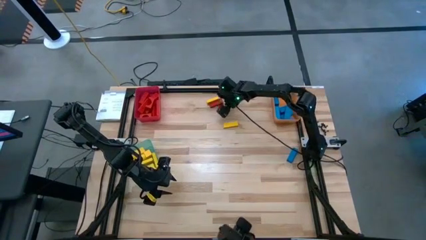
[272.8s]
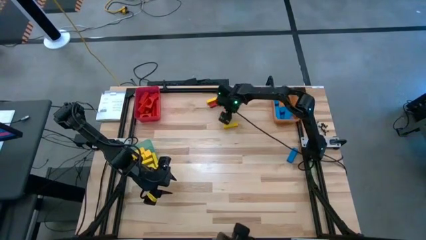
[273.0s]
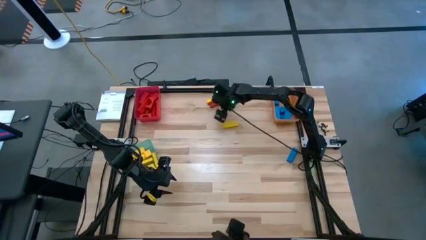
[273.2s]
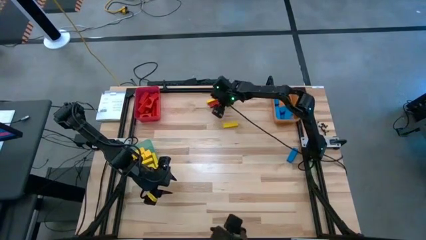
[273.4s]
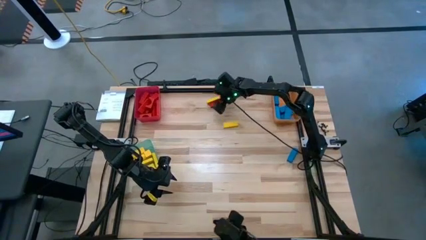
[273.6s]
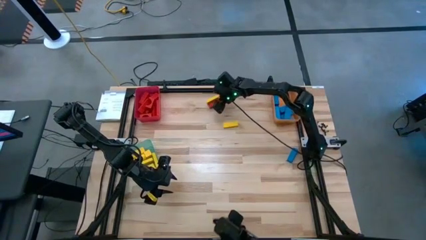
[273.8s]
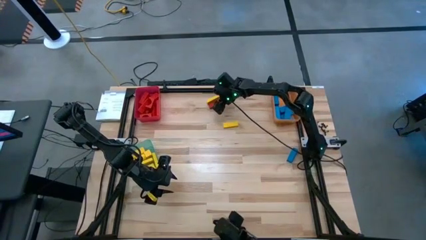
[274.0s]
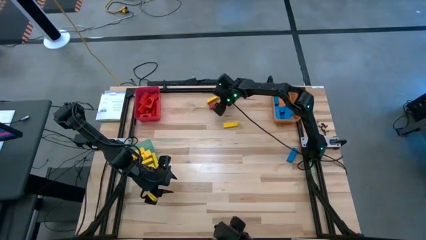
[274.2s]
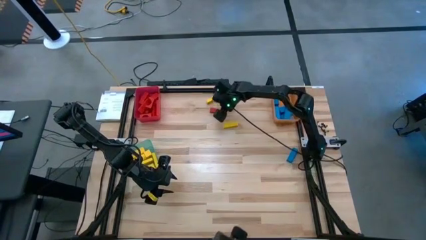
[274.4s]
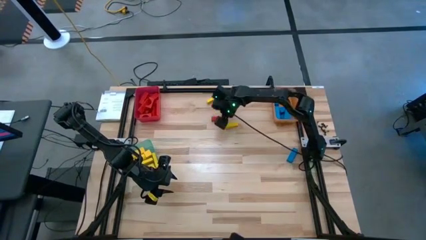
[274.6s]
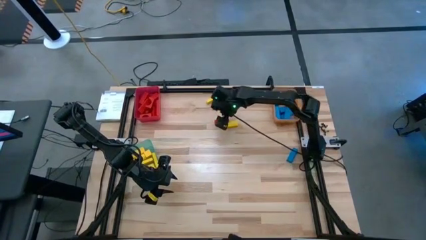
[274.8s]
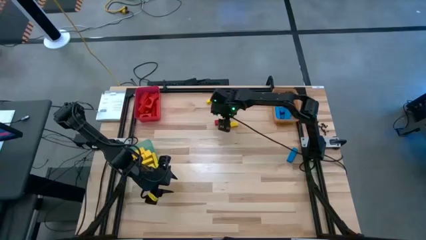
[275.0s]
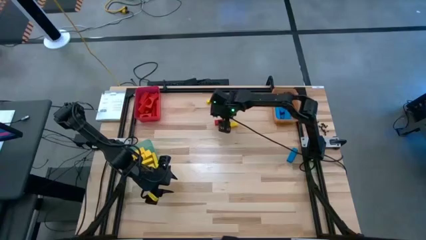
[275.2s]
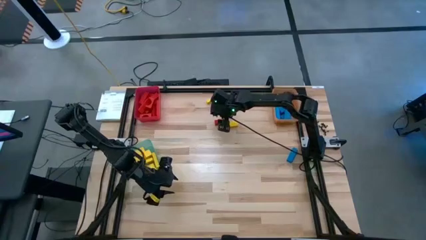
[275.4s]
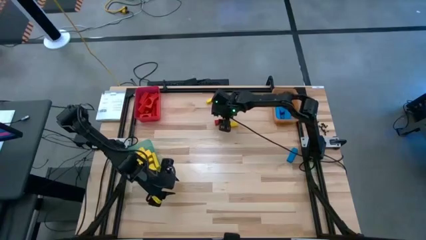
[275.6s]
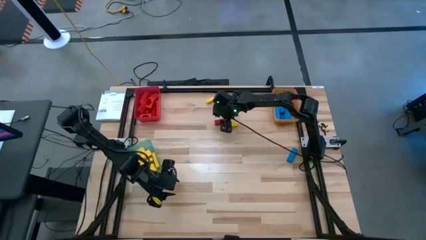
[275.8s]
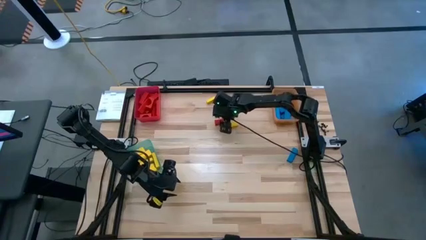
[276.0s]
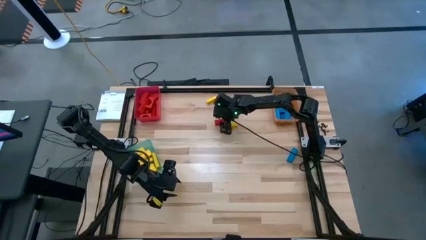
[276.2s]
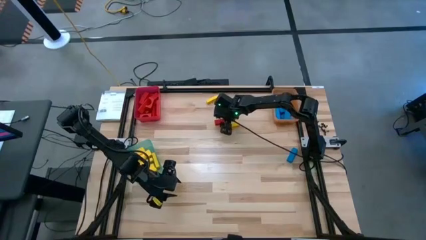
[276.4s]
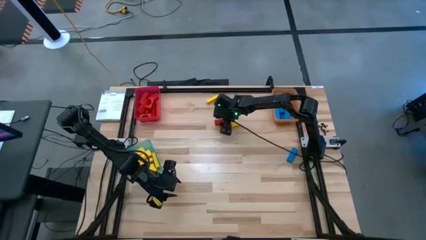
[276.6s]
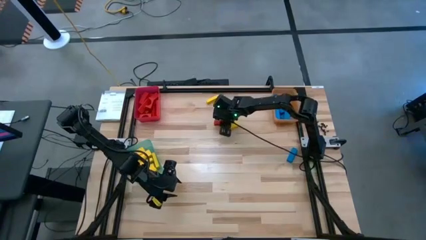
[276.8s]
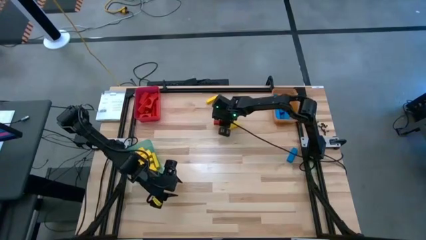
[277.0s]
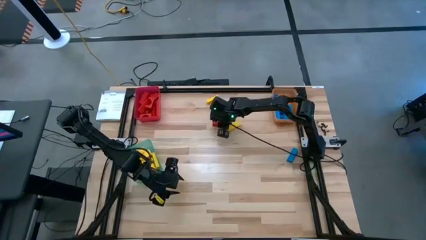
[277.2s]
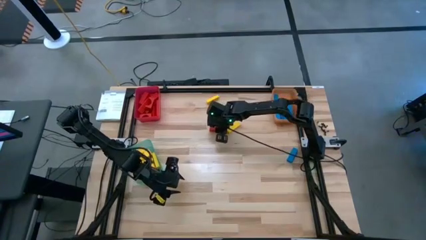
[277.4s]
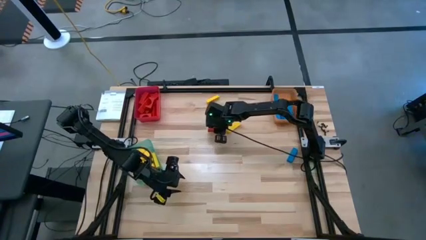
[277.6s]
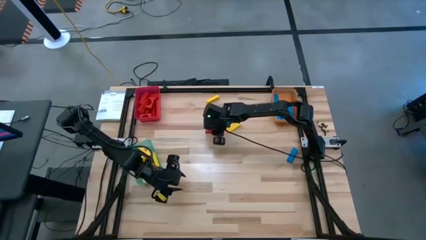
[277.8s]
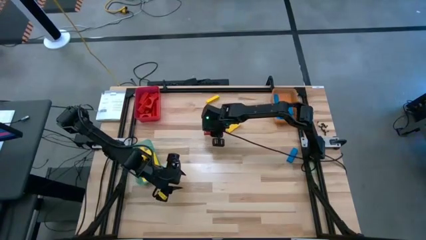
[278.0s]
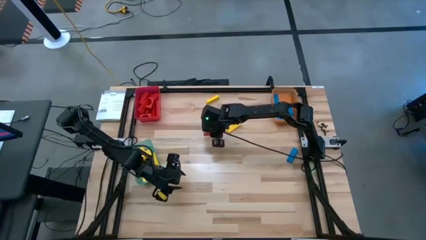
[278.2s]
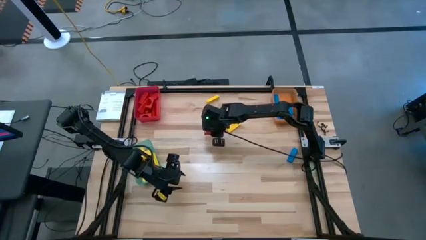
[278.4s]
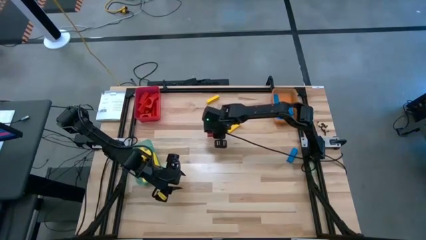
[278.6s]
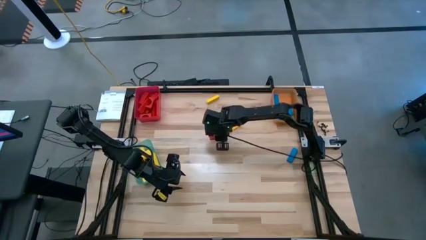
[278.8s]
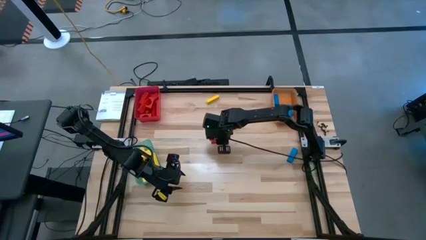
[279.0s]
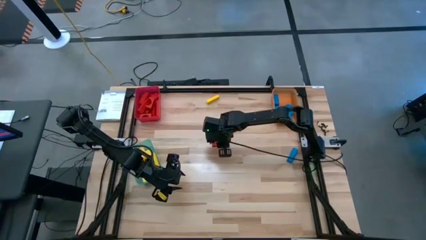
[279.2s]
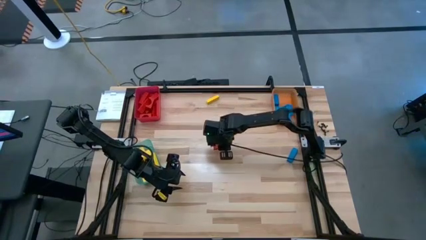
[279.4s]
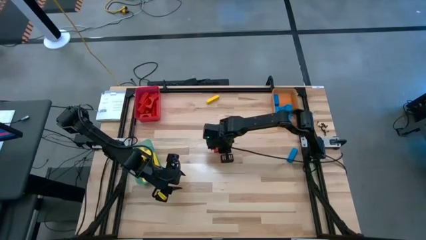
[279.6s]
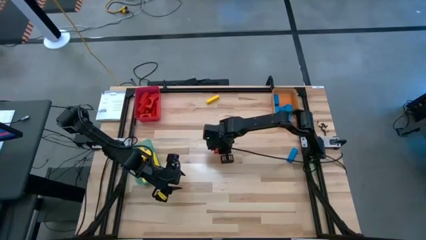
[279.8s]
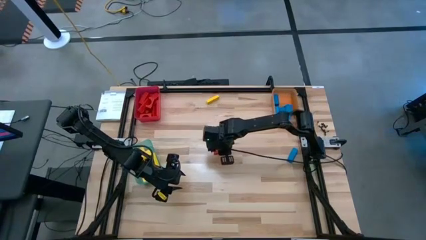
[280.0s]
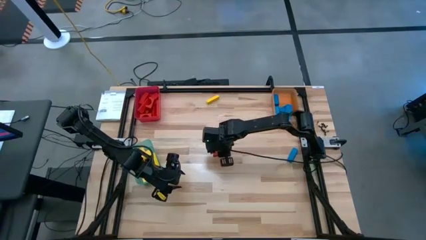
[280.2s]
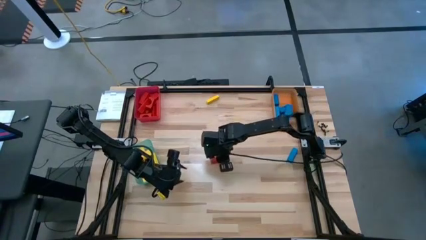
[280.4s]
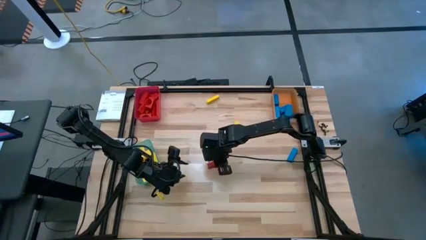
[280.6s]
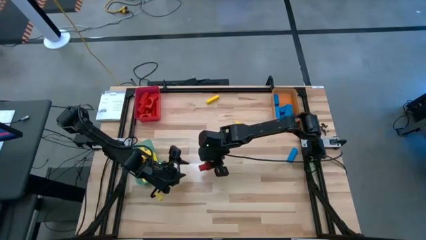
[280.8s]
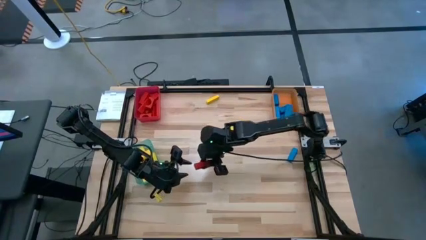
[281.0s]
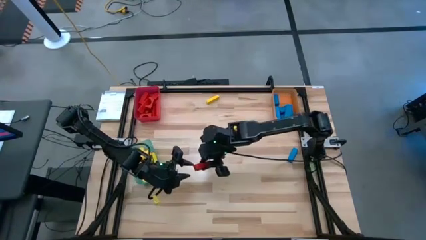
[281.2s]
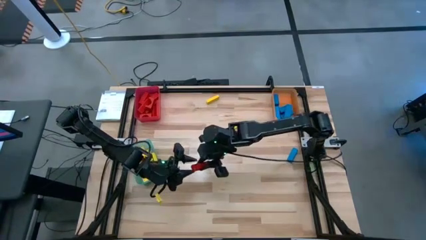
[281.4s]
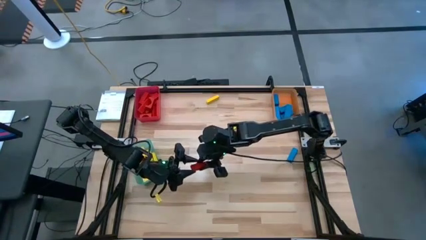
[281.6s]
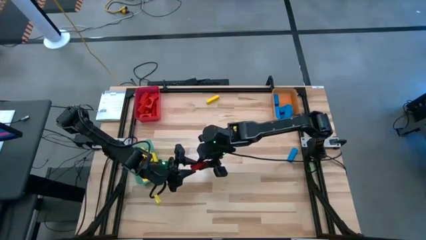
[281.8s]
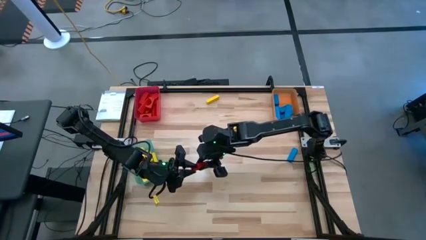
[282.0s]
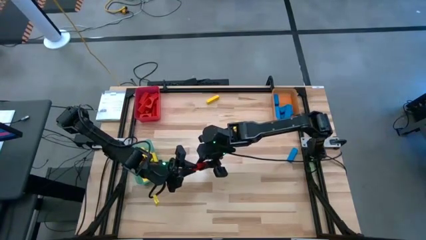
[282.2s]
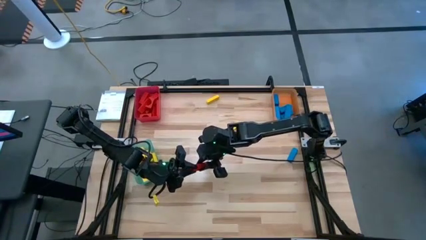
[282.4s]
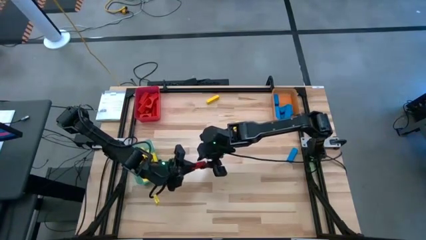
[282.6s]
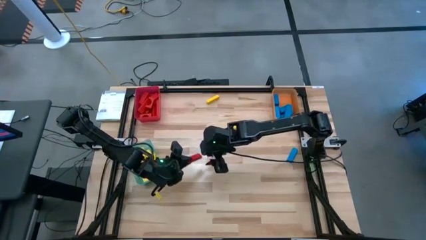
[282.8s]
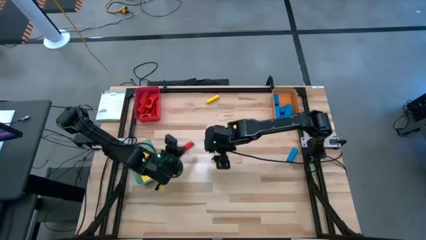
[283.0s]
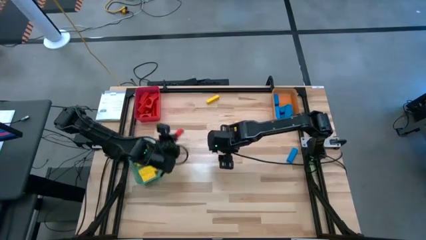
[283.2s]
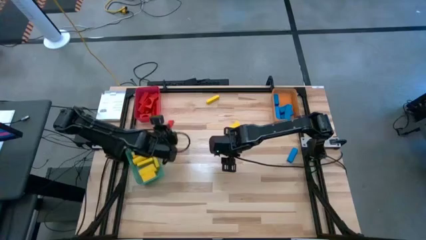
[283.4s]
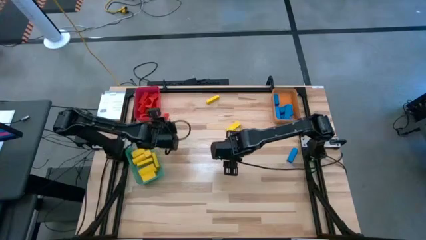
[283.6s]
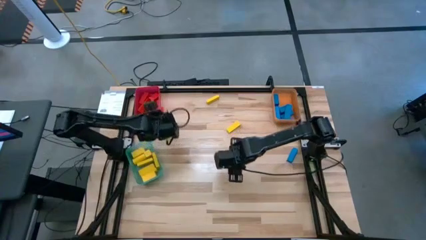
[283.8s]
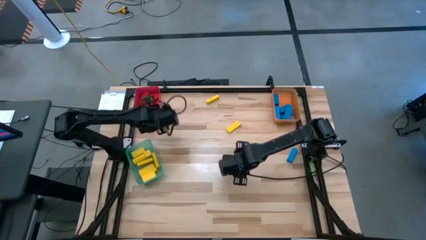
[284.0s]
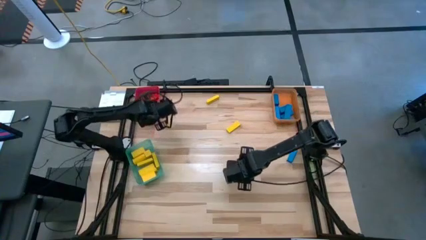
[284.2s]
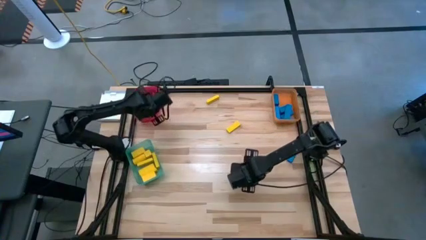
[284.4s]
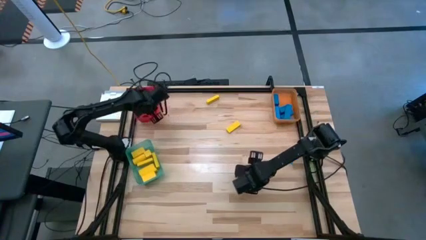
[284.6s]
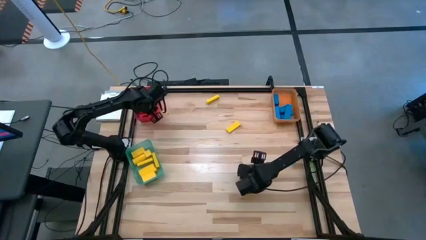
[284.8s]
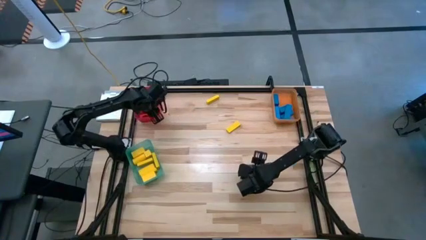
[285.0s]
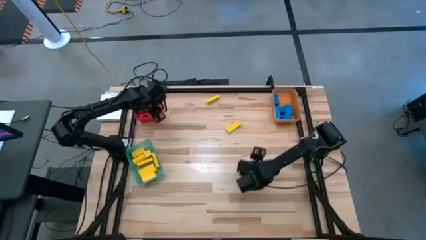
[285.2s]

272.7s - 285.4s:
Task: Sort blocks
Put the red block into the red bin
